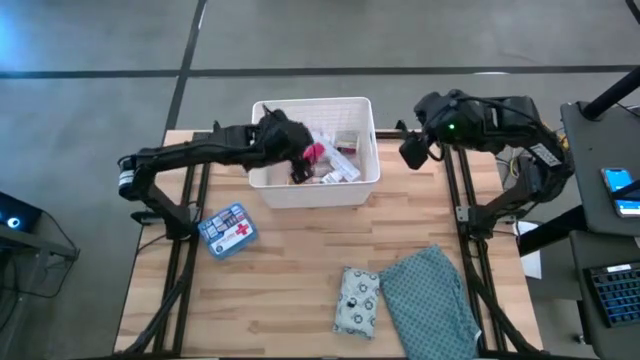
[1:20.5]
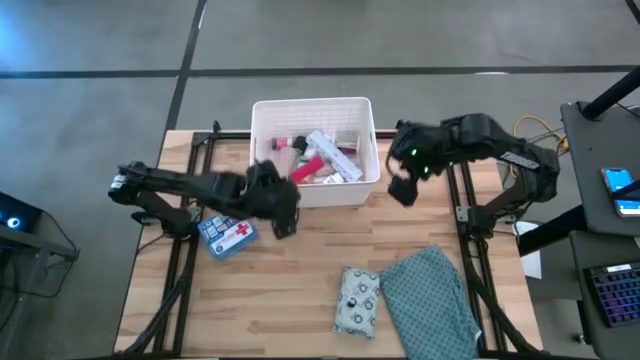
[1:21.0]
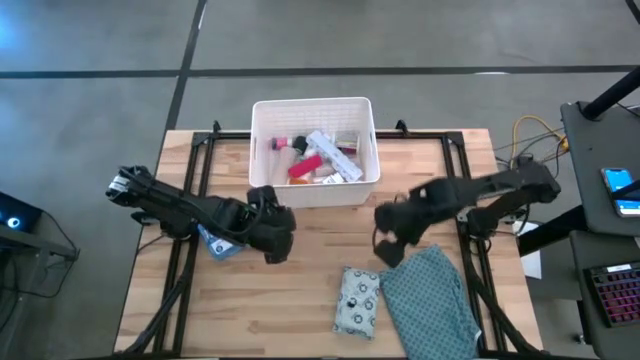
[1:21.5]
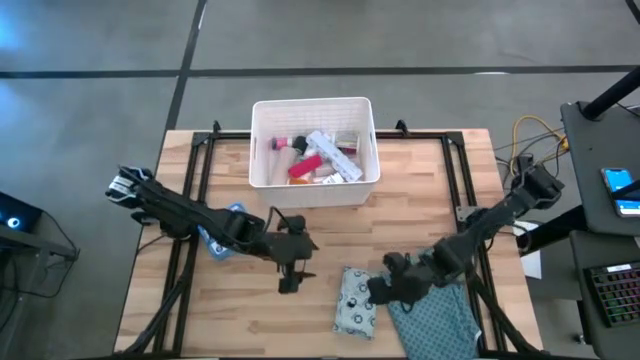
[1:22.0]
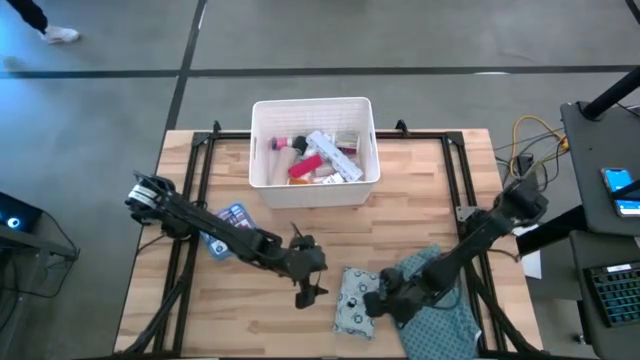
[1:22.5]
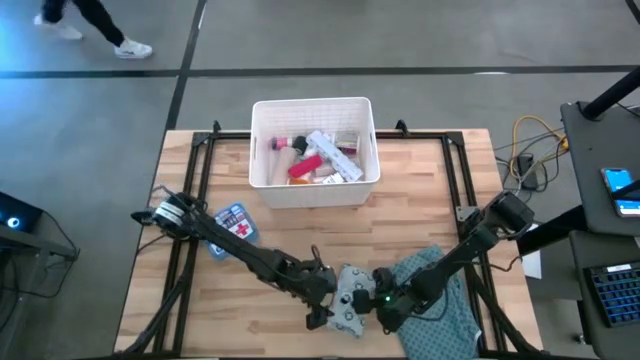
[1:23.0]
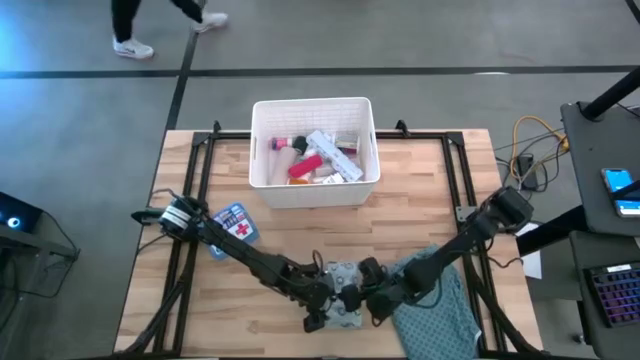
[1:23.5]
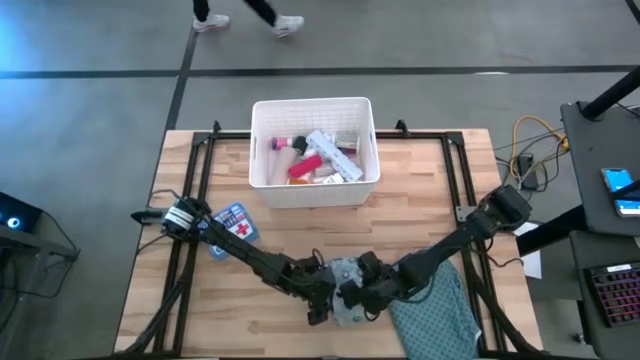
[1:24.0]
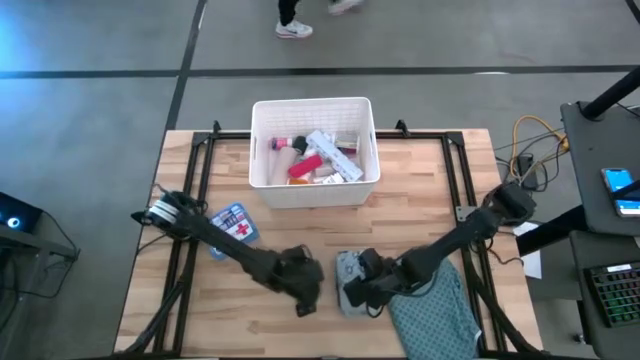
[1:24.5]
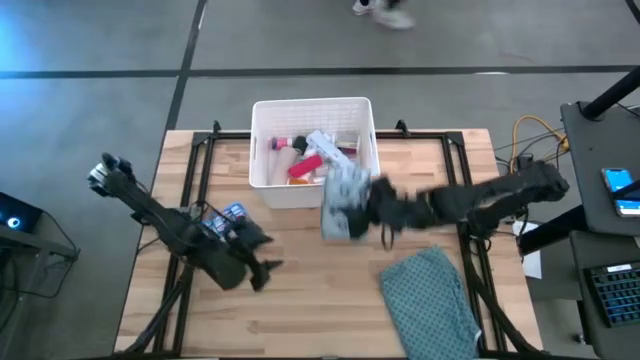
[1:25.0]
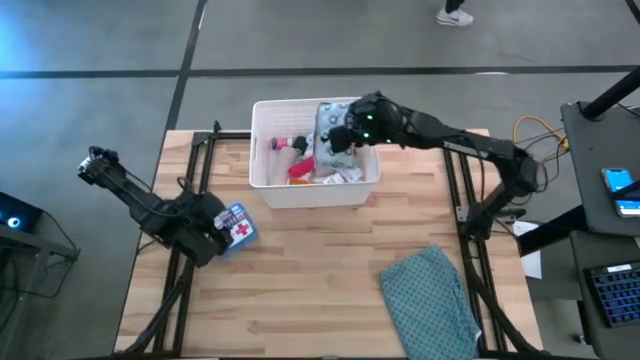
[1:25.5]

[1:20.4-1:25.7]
Task: Pick & place medical supplies in basket/bin
Put the white bag into the white bin

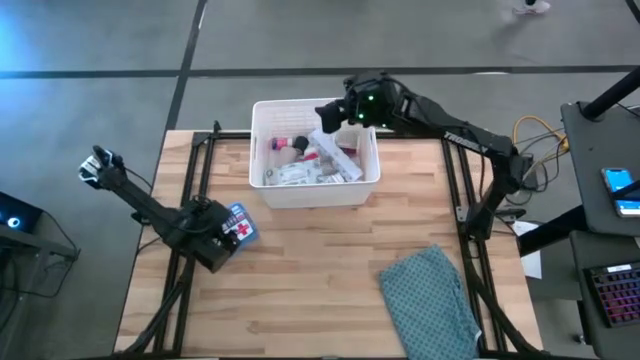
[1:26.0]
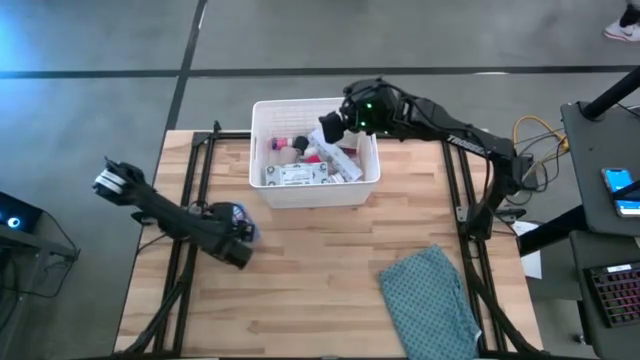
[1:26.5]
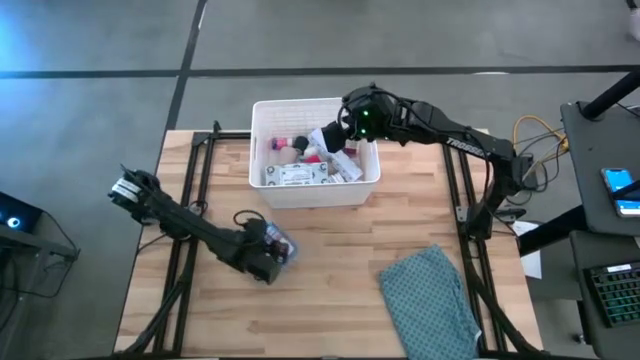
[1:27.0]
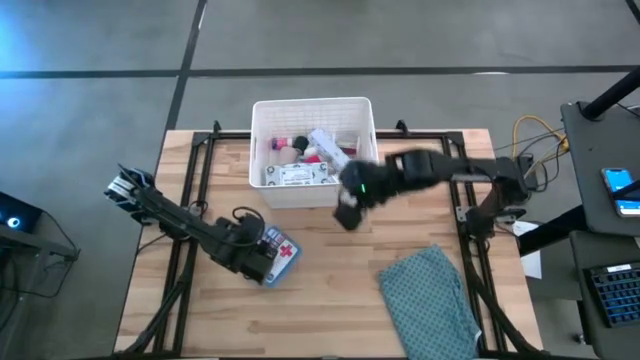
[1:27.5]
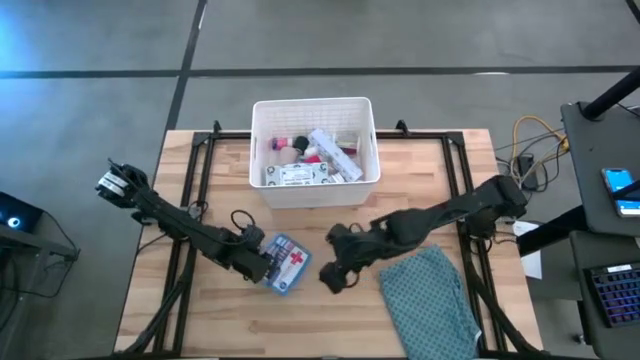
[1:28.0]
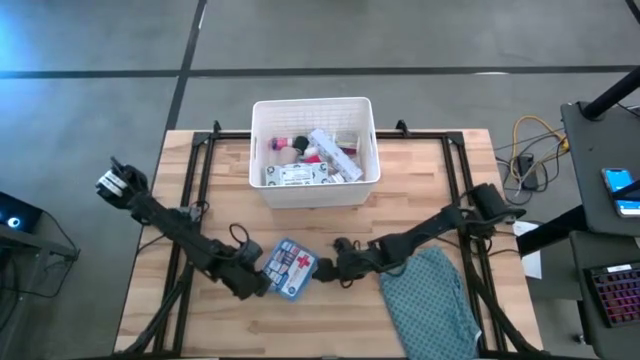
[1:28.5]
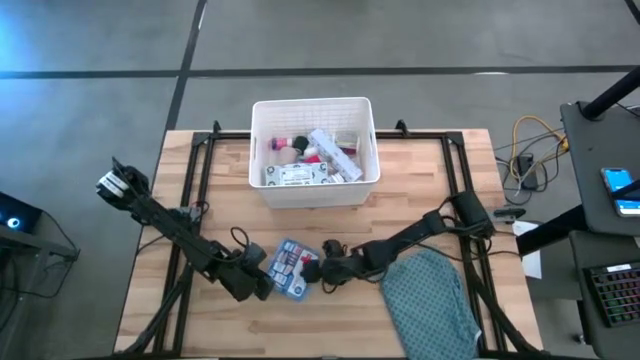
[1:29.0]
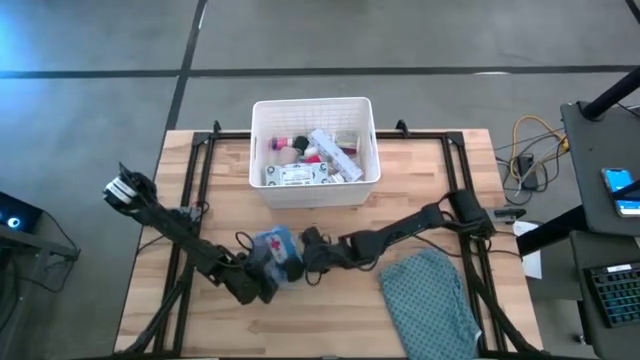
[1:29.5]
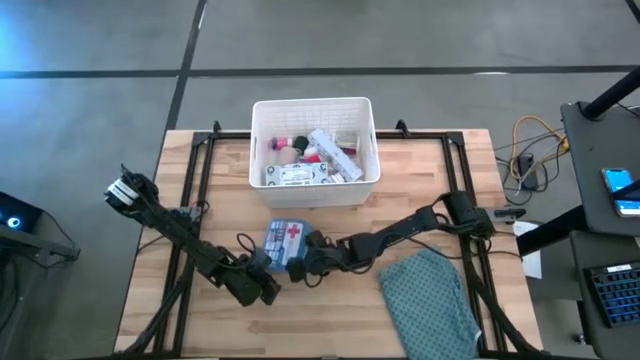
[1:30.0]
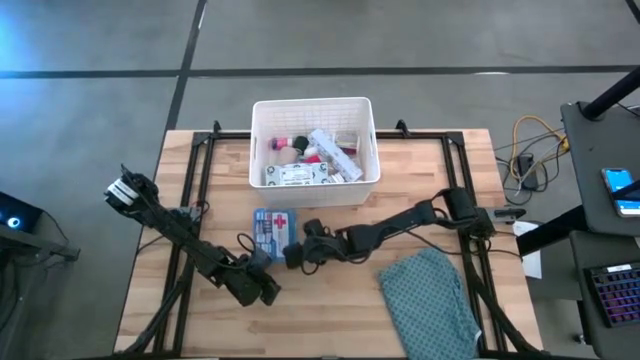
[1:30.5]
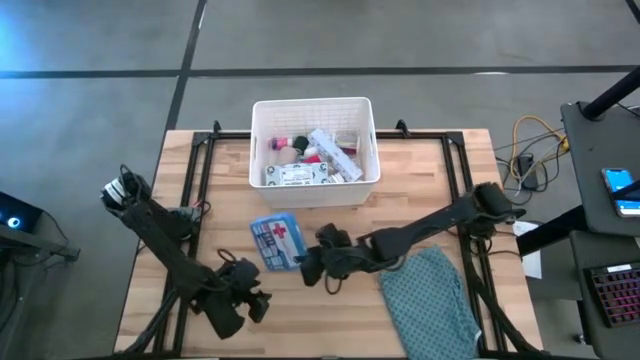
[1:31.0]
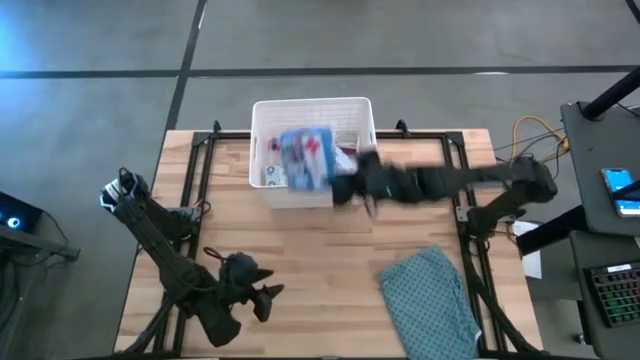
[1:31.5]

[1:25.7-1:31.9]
Put the blue kit into the white bin

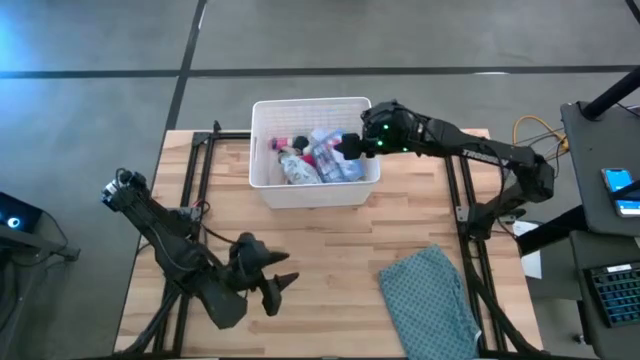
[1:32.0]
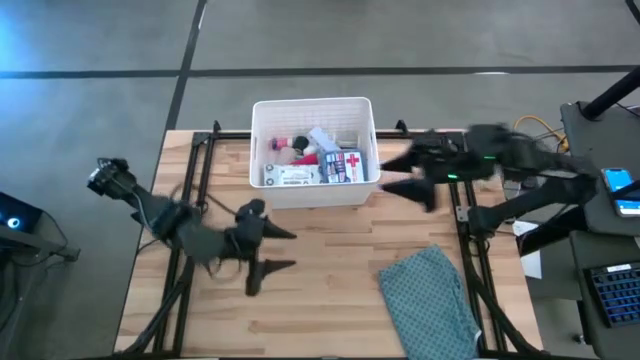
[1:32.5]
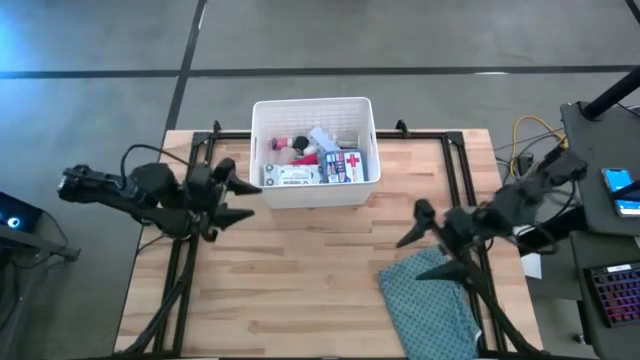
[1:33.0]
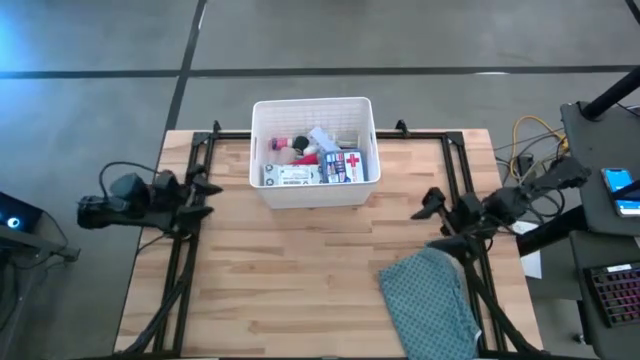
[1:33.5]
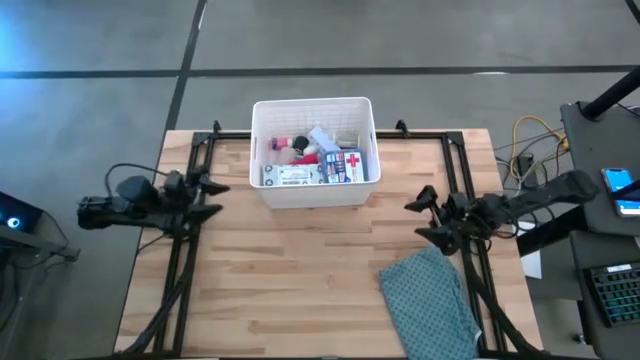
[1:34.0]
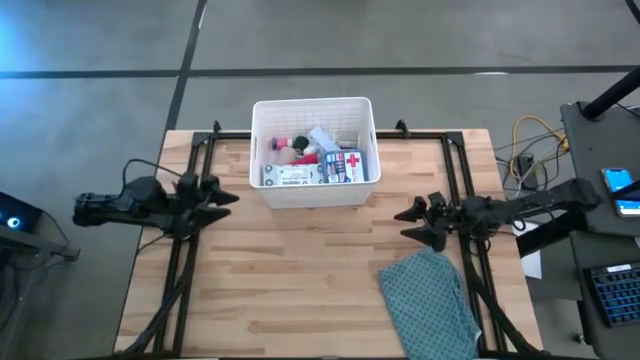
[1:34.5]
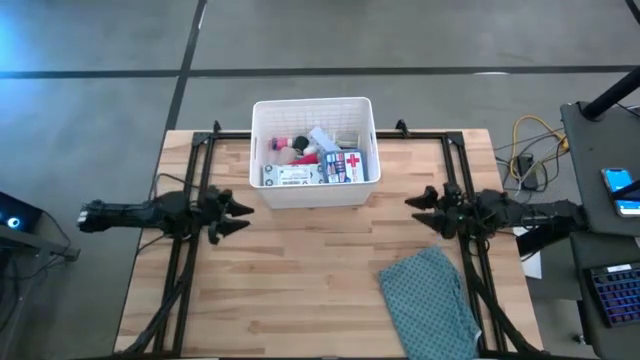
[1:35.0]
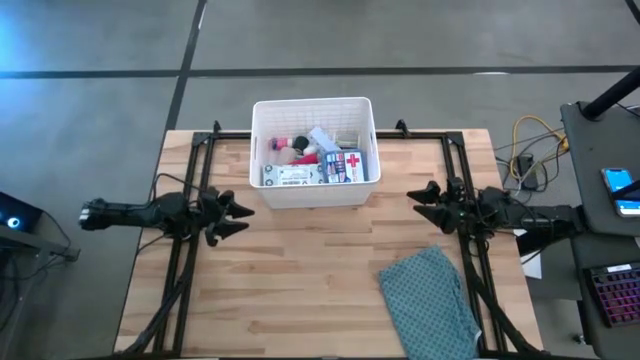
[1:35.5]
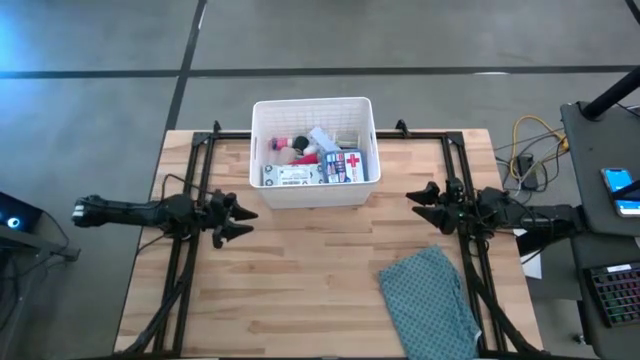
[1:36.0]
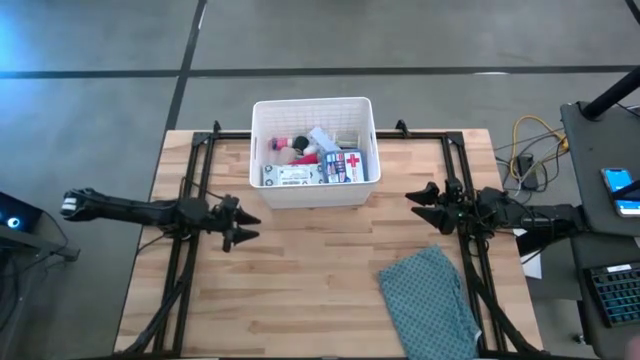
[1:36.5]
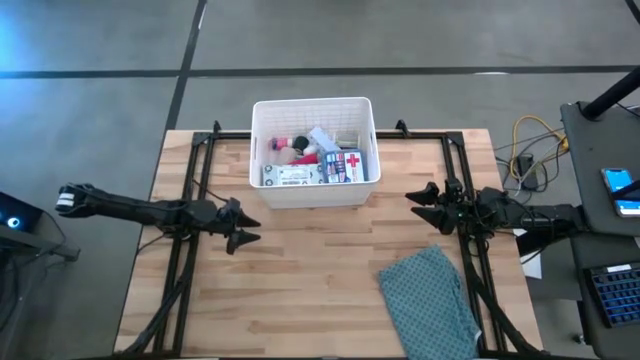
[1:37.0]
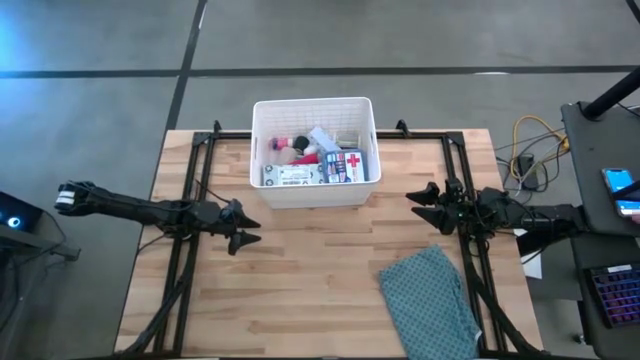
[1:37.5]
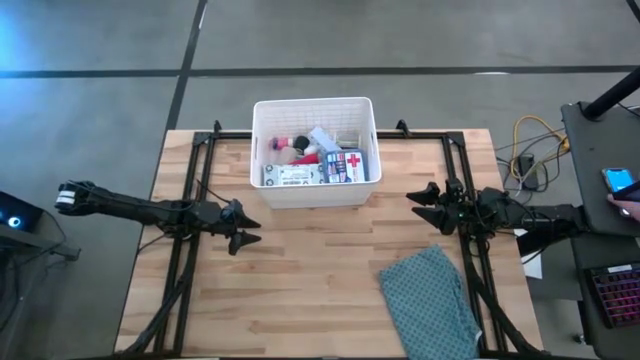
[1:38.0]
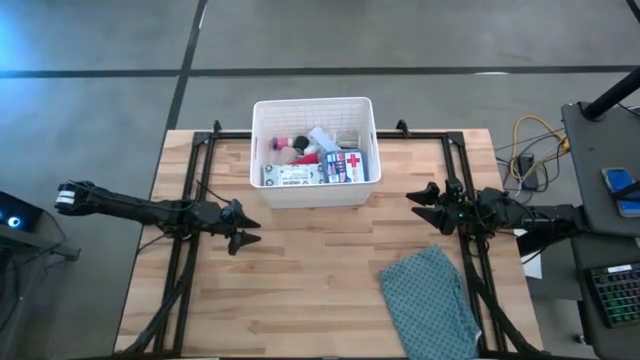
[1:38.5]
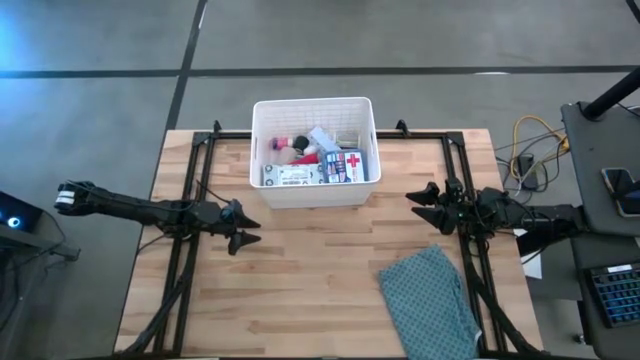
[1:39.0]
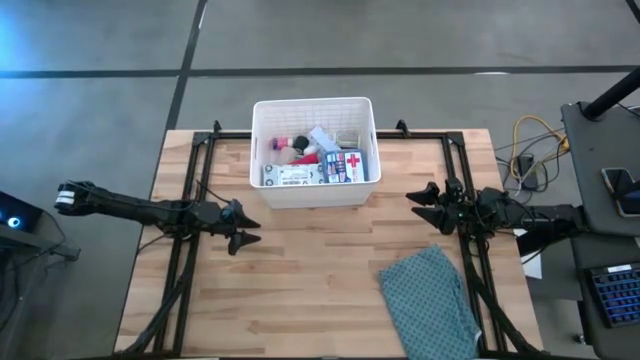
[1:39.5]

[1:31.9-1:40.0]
Return to Home Position

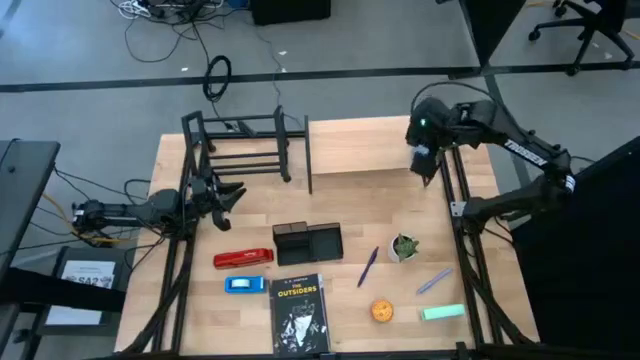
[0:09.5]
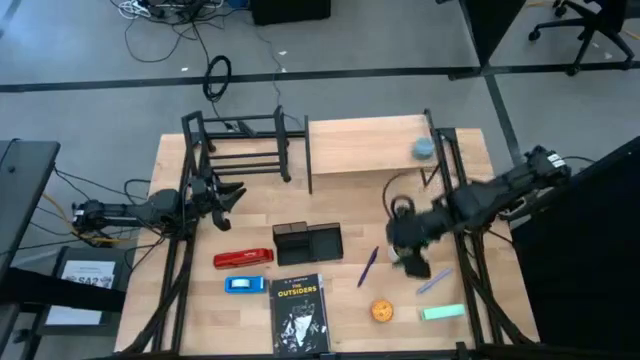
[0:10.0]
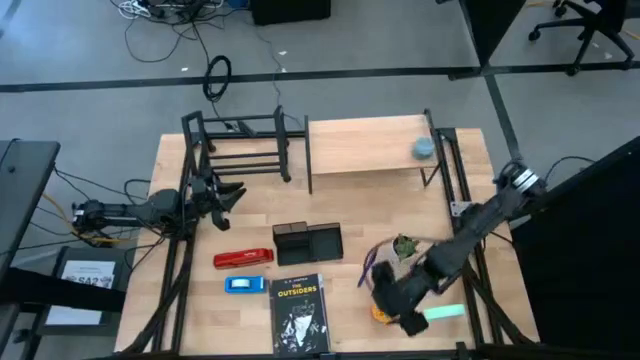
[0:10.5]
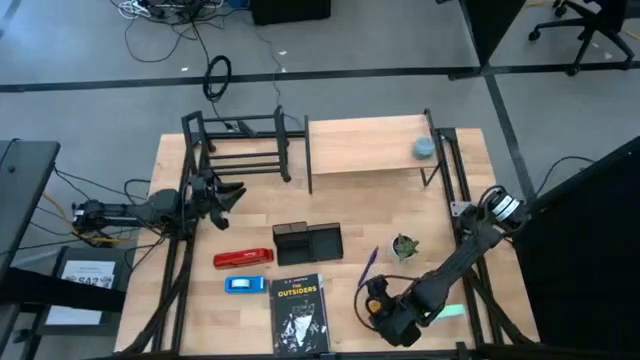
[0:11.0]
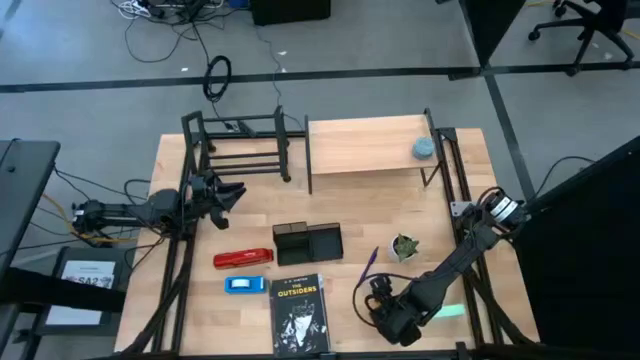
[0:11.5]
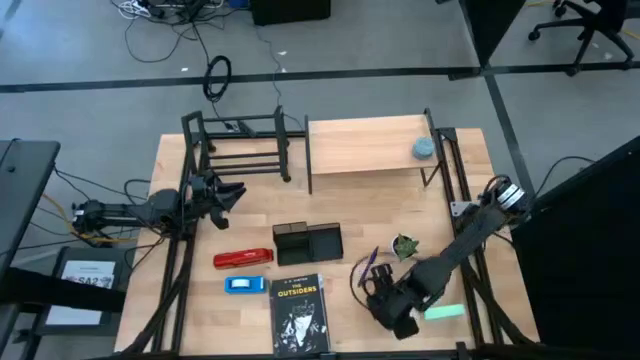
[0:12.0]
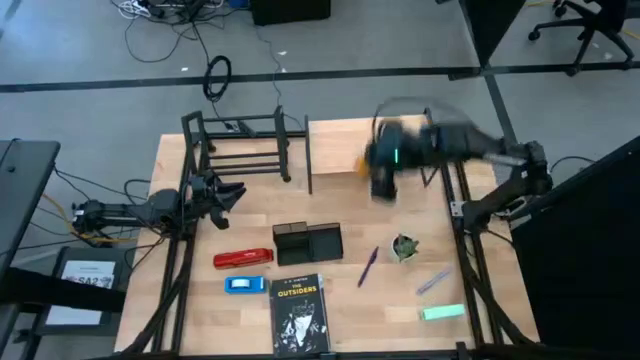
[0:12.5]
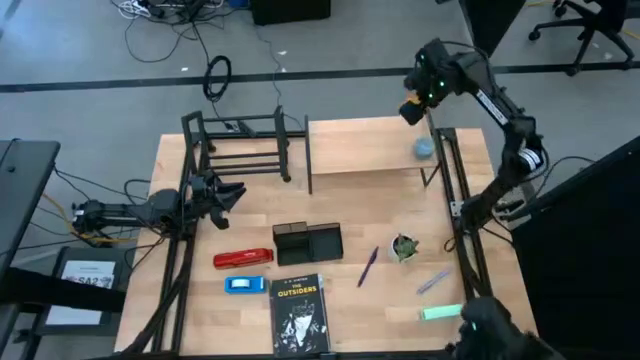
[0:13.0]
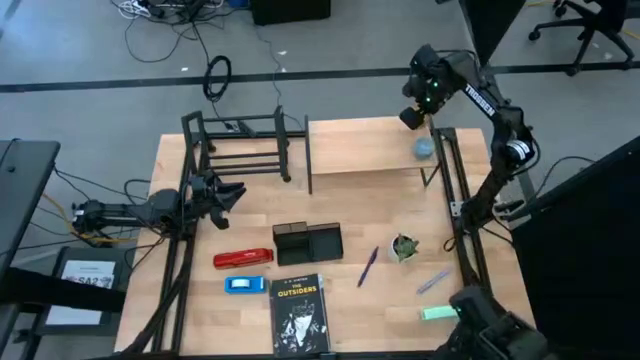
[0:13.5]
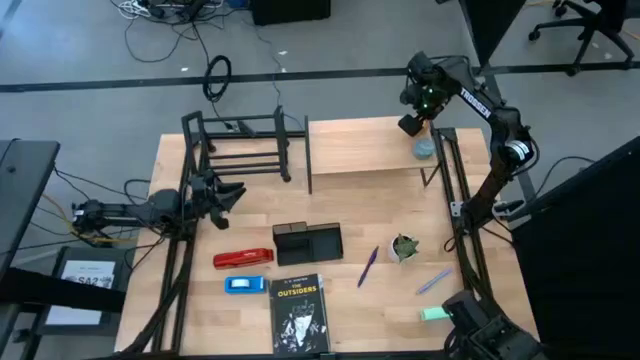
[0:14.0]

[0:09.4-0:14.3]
Task: Stock shelves
Put the yellow scented candle on the shelf
